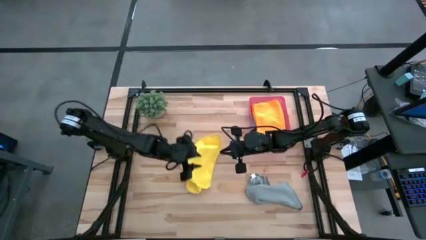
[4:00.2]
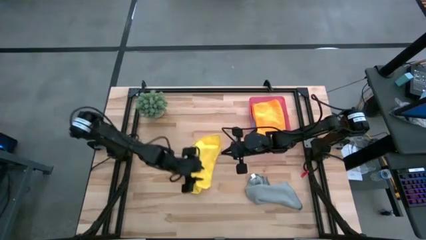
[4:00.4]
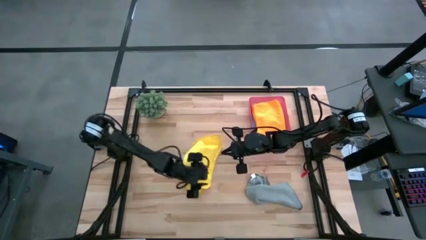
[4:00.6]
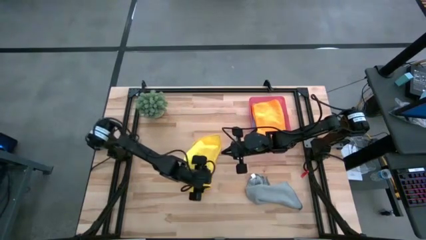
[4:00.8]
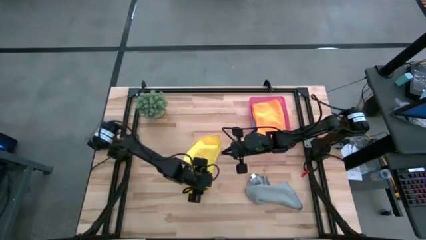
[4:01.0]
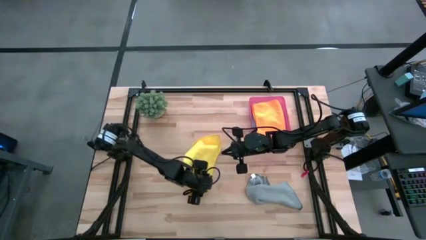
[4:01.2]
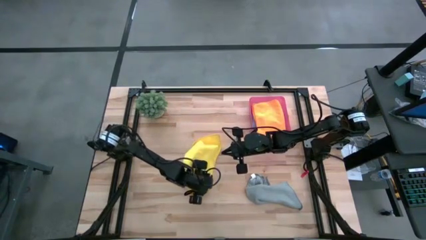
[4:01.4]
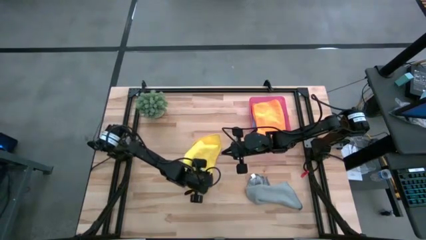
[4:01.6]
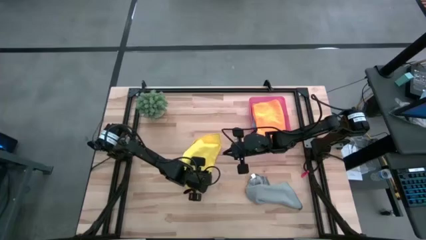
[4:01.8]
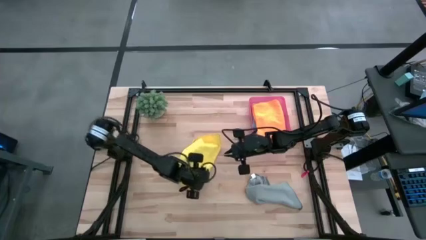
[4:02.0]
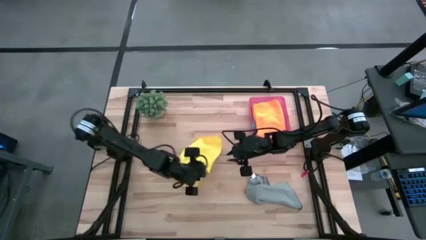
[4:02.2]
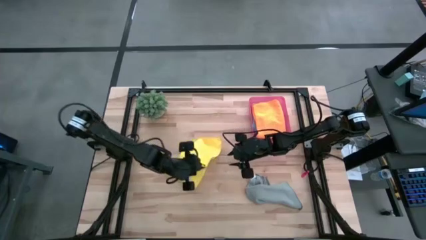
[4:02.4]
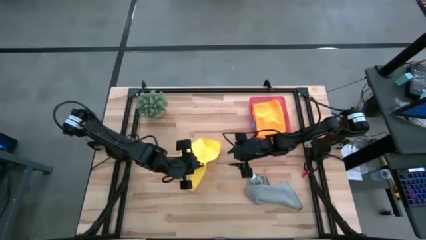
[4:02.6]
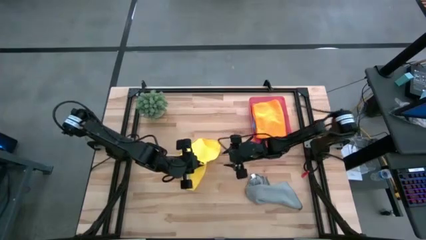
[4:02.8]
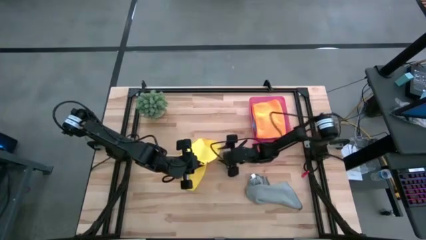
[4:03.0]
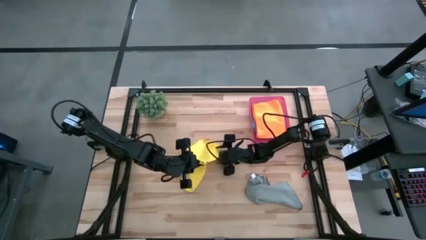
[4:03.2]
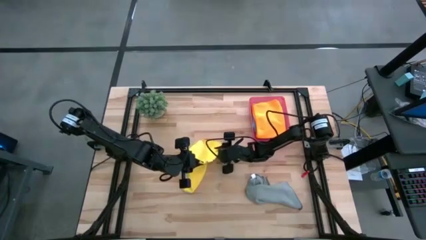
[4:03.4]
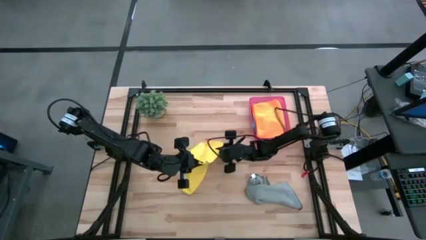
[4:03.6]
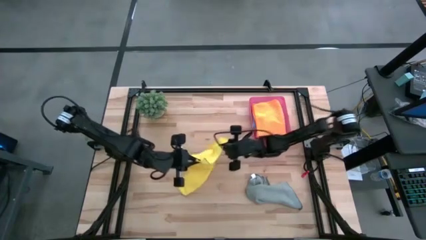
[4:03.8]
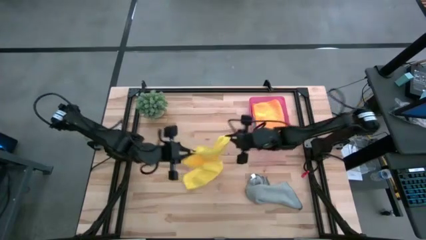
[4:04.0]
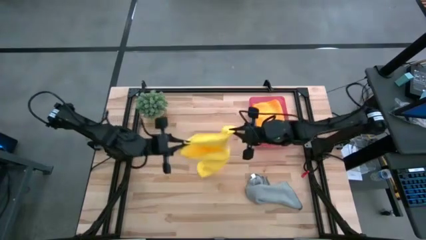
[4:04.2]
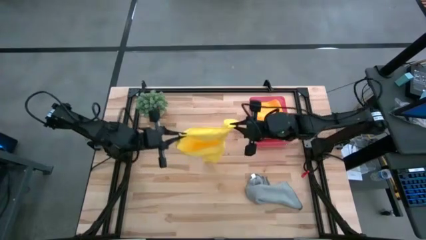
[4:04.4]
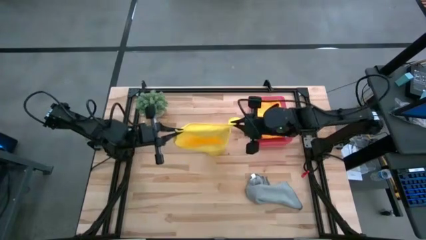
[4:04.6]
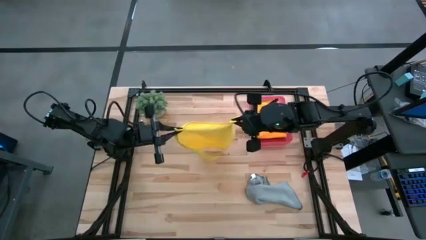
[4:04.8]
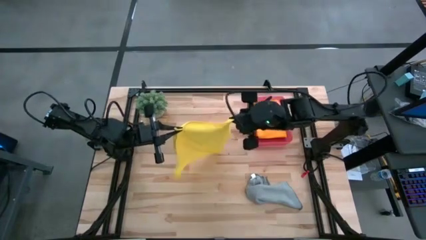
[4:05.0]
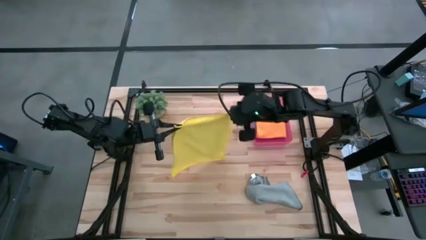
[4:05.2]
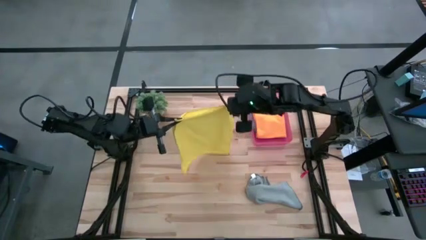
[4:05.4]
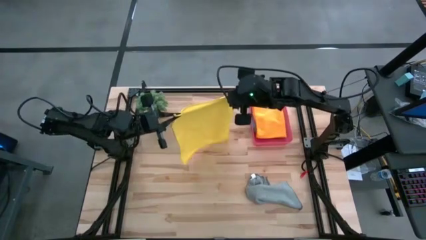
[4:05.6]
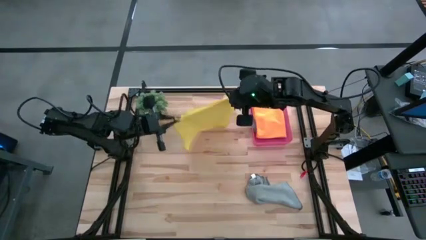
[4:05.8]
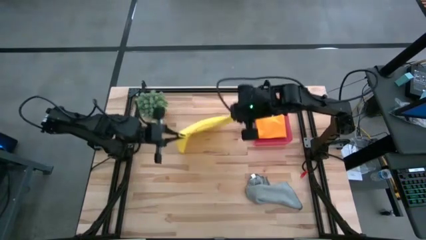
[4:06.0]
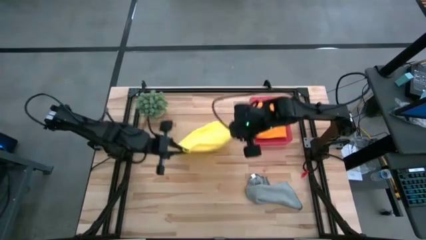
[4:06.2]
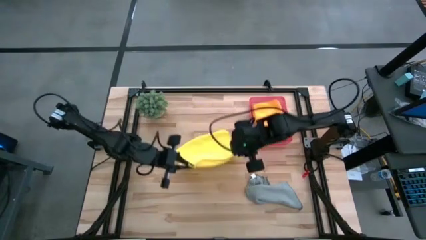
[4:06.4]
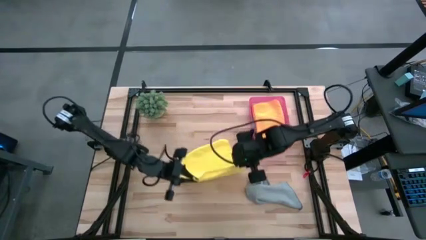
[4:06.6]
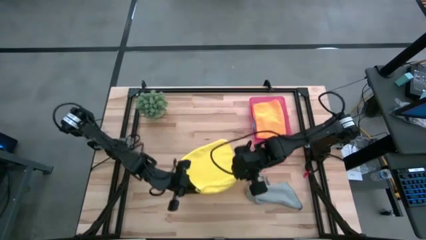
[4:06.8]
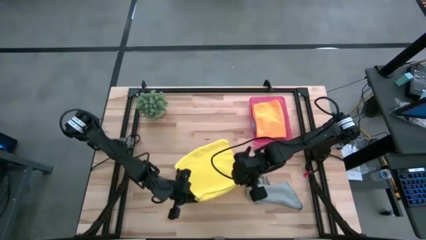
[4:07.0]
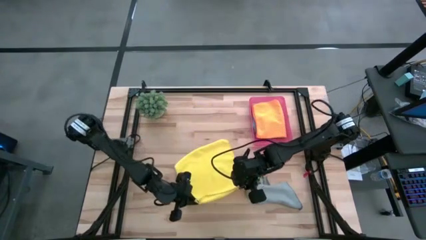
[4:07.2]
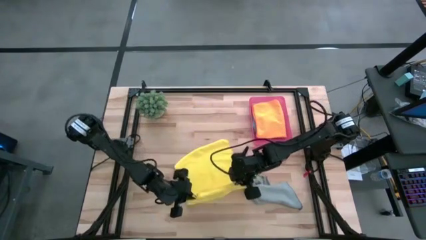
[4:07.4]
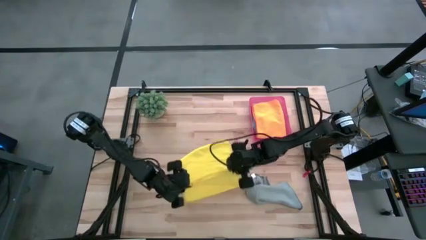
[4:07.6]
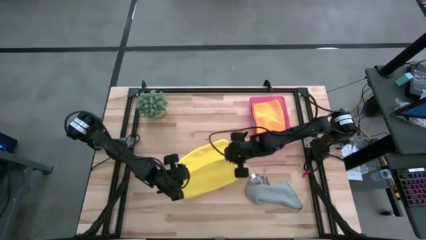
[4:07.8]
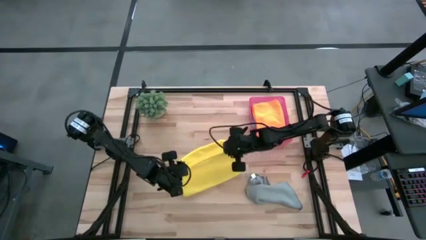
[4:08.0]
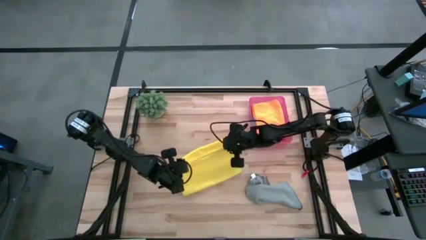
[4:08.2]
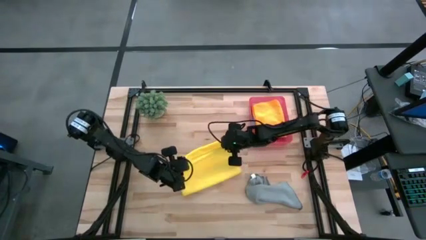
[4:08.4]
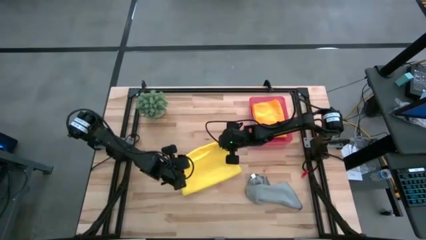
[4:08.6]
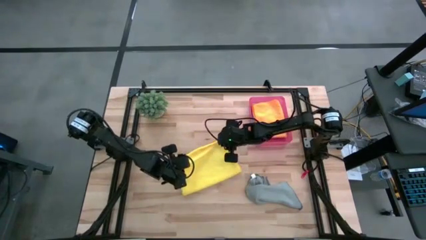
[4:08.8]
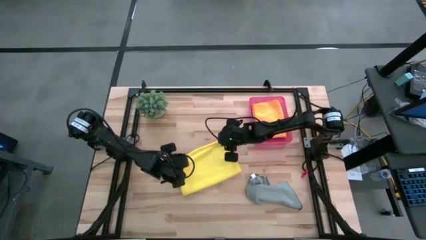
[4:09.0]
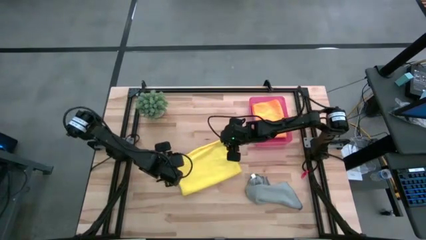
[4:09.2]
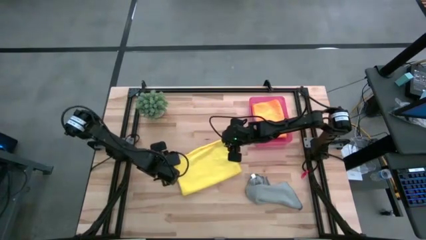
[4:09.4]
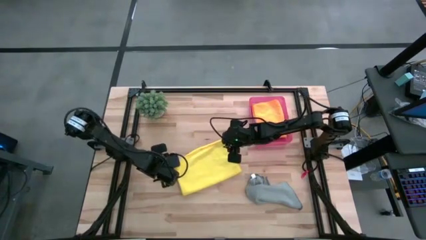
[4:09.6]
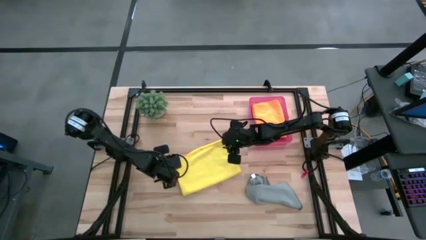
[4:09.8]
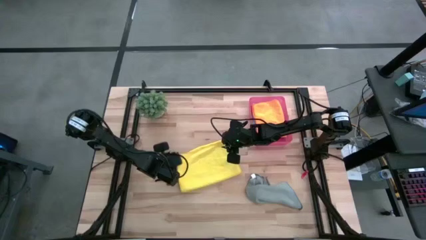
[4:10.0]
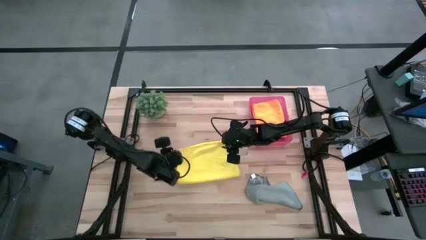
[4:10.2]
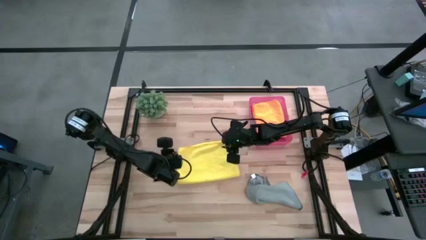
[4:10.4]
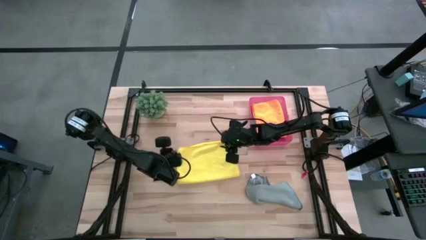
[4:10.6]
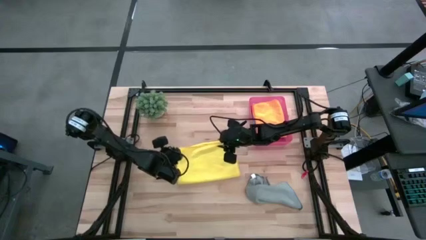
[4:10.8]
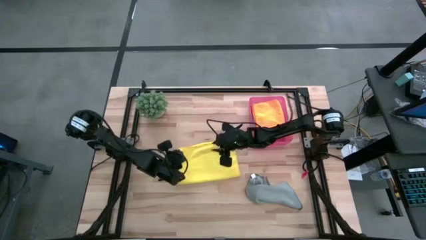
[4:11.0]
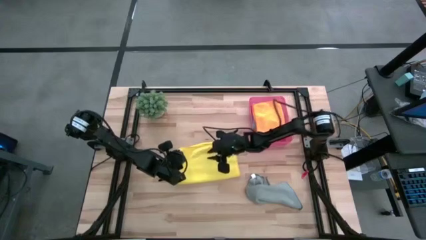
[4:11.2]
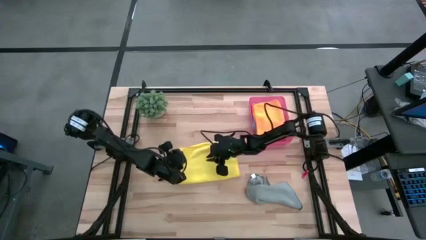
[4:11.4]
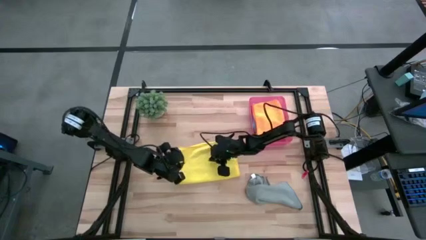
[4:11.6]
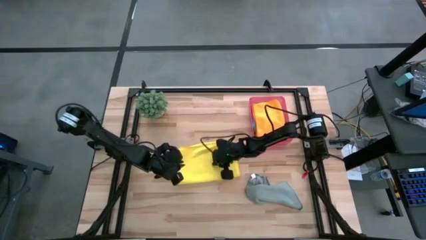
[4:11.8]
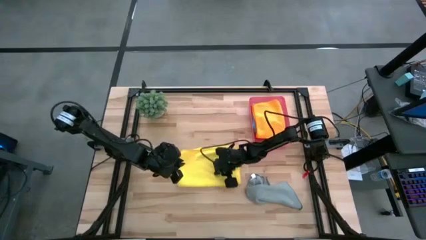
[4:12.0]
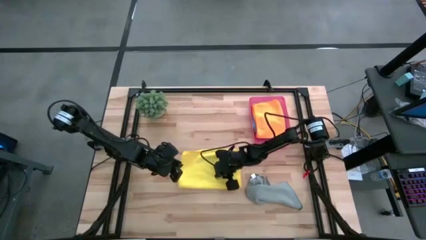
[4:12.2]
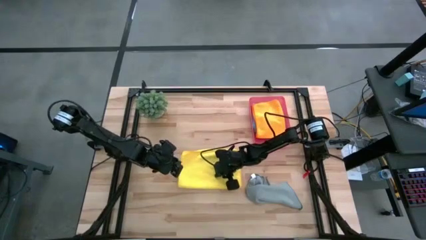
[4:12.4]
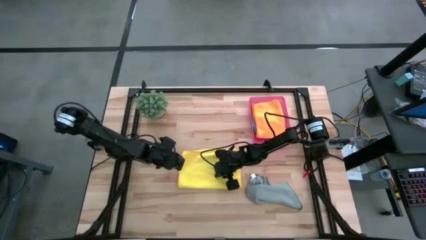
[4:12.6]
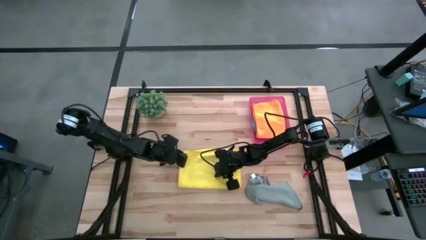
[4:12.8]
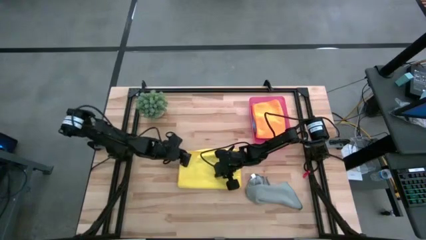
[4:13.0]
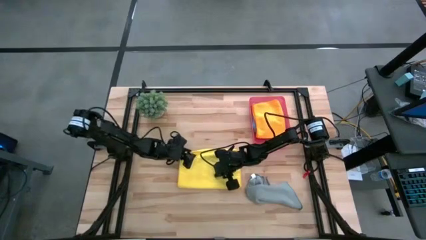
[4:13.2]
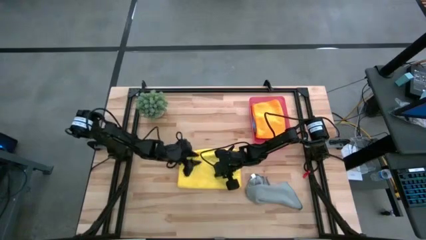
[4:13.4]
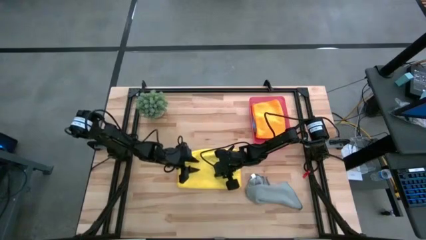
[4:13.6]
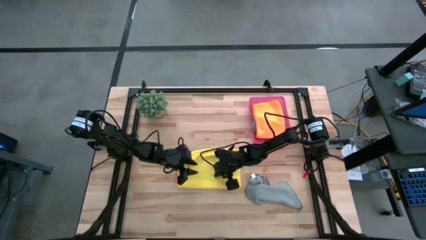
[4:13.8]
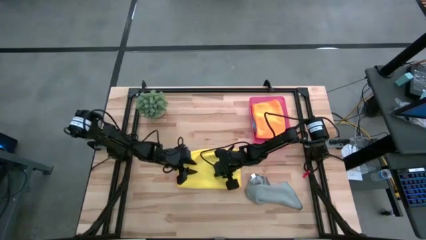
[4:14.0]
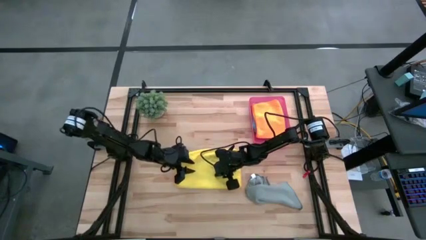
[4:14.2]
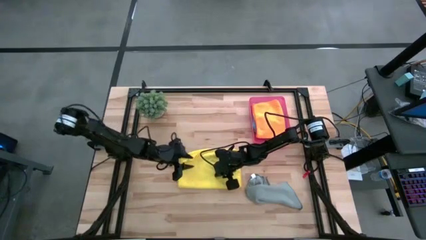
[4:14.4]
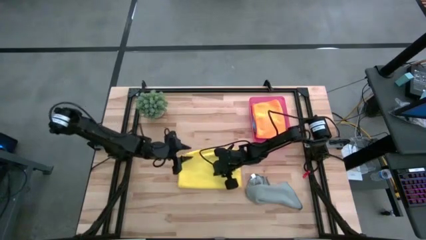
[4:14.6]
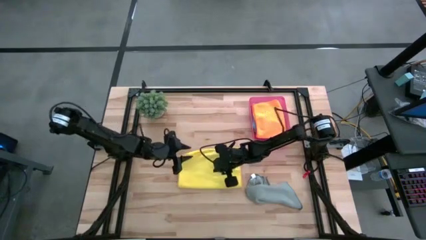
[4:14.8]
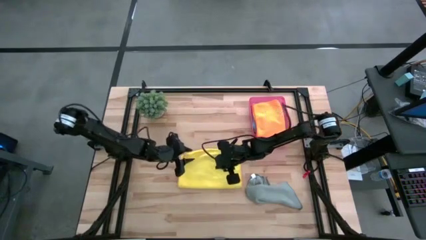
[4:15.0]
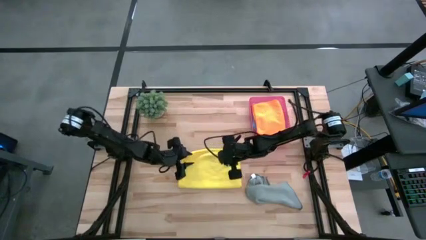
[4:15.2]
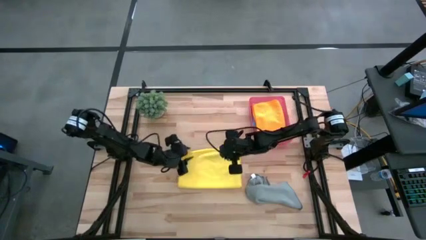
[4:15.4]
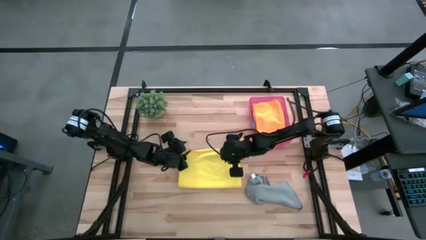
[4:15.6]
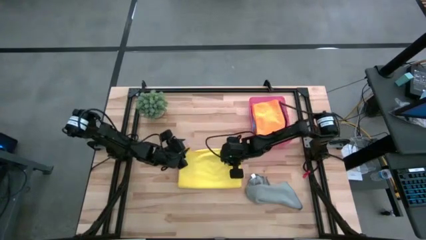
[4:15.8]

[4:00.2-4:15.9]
Task: Fold microfiber towels
Fold the yellow microfiber cloth
